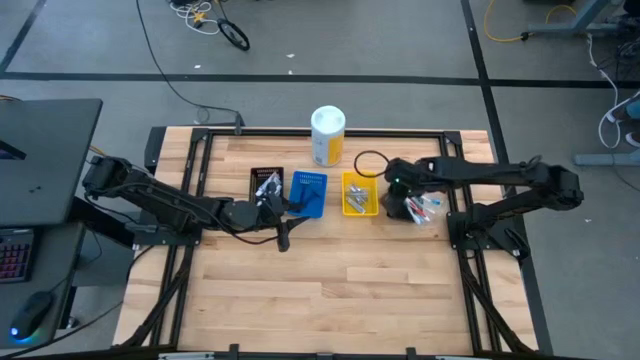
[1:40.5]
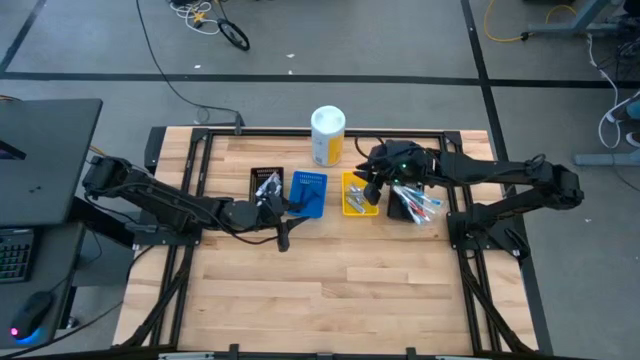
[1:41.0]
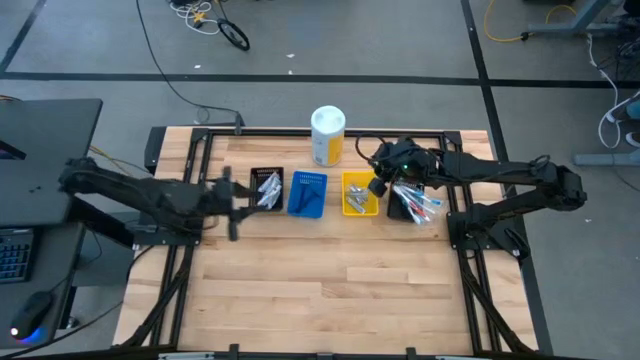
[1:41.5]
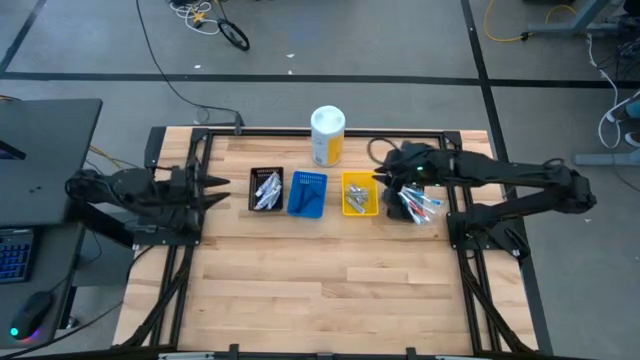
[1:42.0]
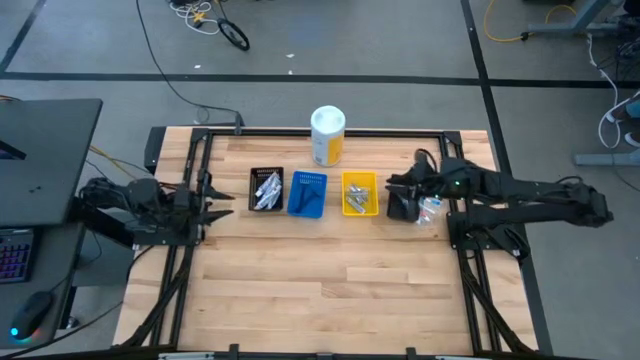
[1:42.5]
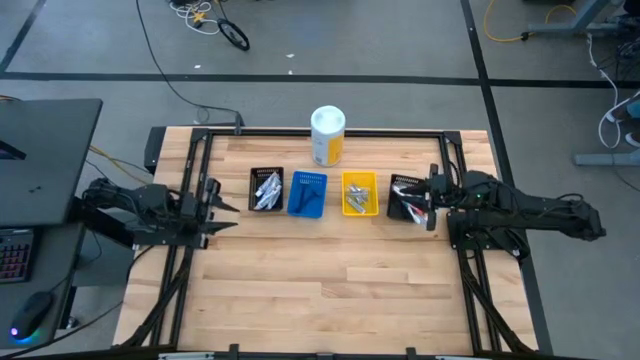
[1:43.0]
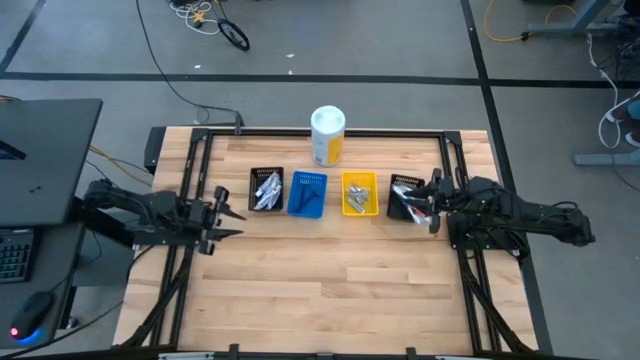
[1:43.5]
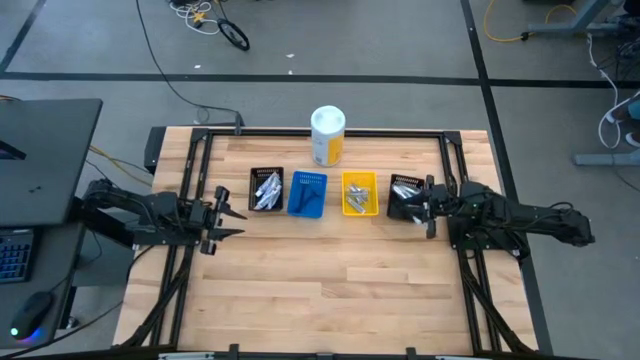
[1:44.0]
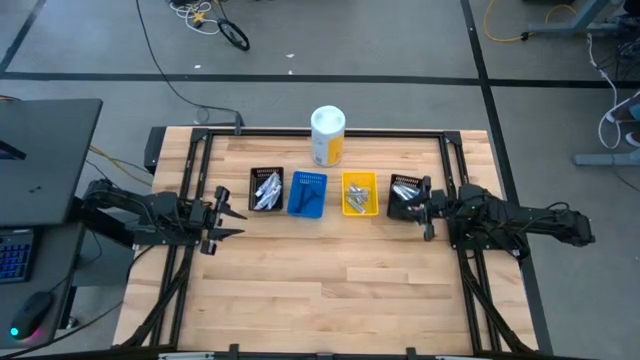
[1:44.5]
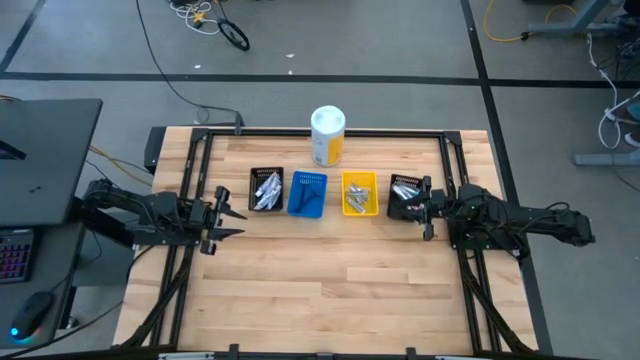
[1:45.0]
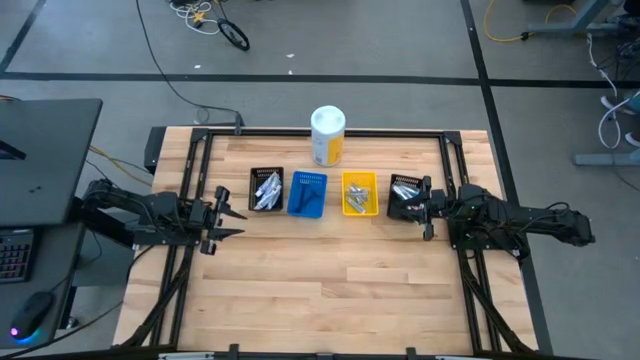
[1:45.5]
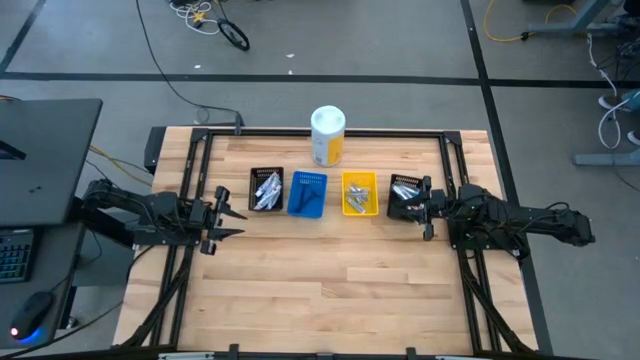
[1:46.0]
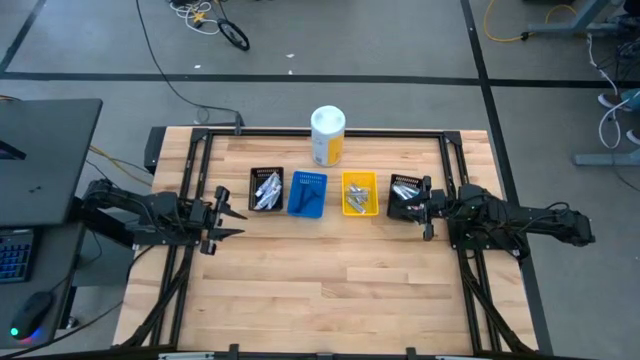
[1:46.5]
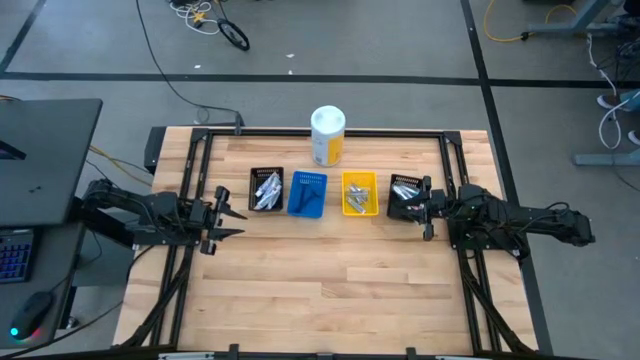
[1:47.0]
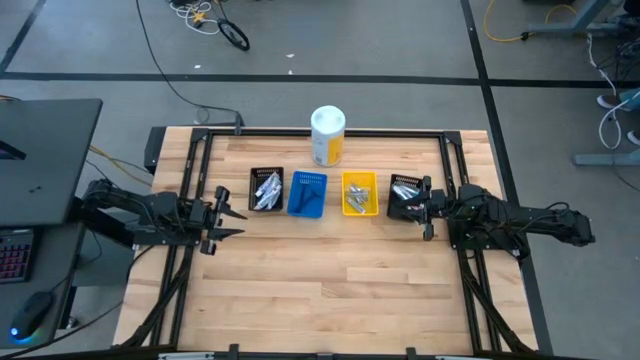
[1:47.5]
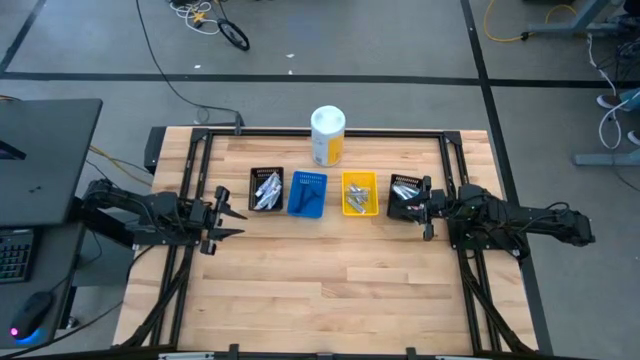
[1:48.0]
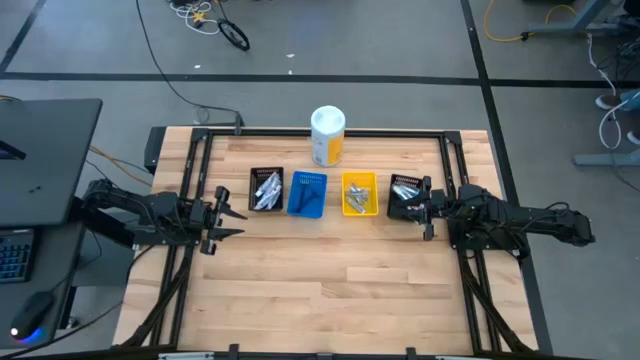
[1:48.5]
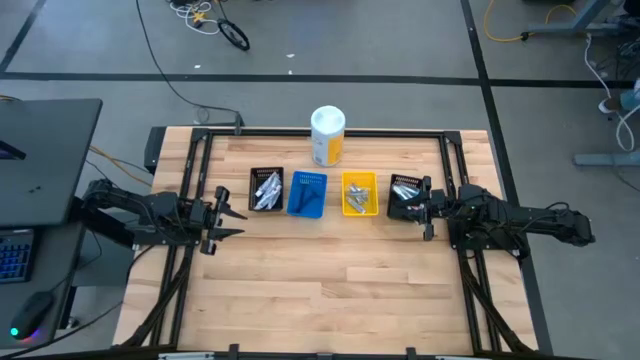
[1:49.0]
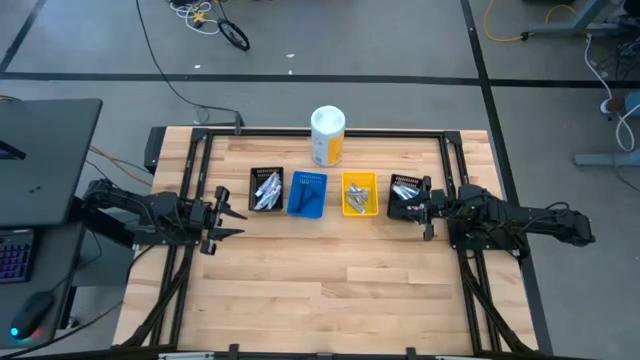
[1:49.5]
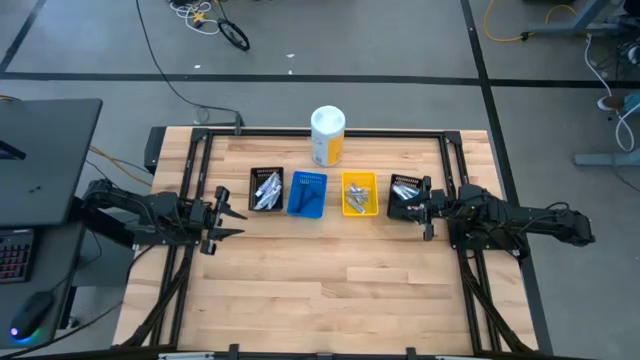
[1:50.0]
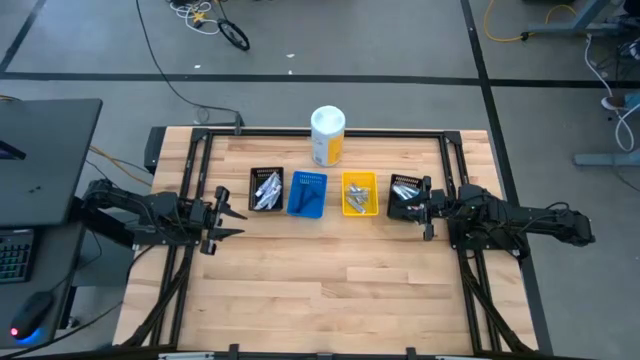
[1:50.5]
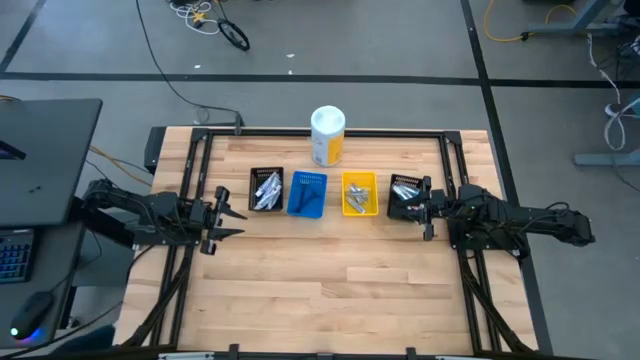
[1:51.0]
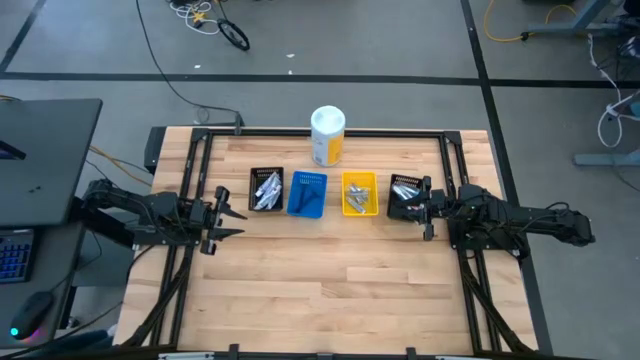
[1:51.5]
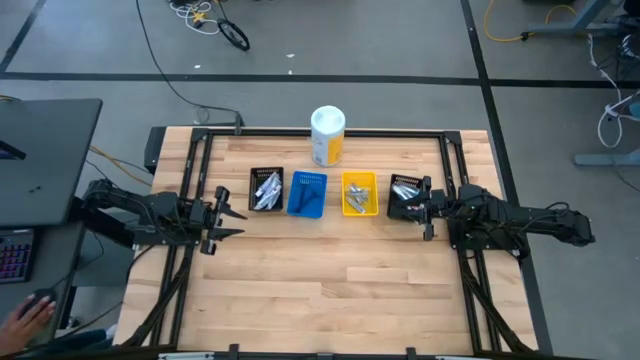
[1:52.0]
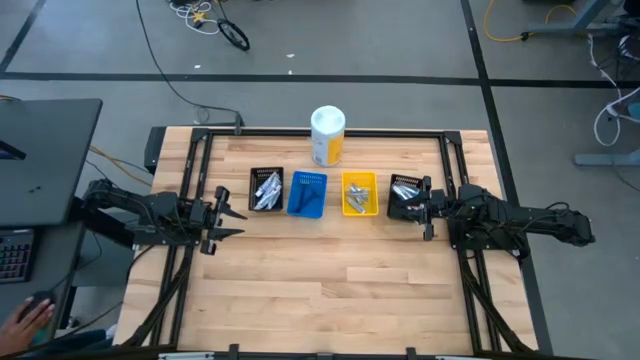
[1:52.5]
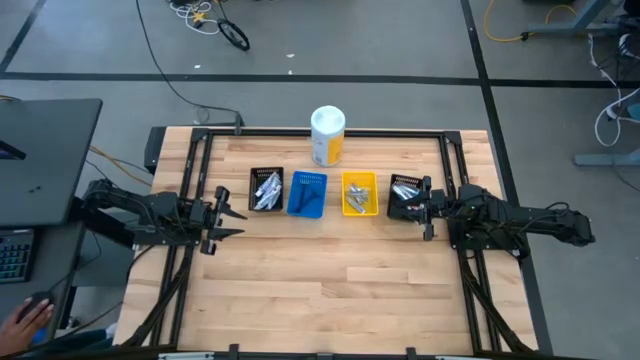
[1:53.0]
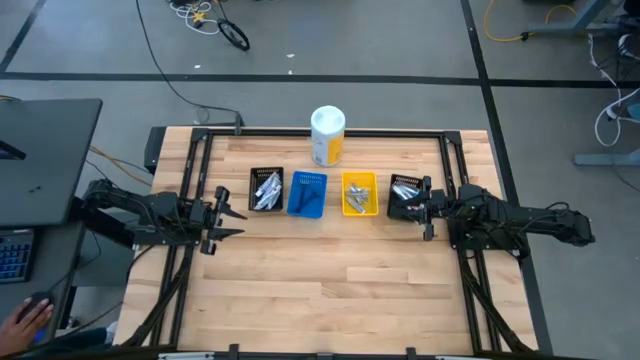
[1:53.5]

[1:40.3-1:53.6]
Task: Pick & Place Travel size toiletries
Return to Home Position
